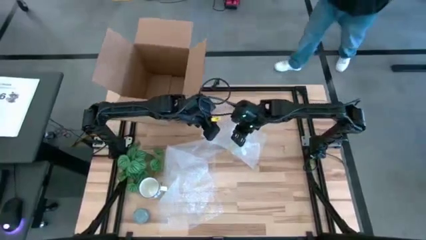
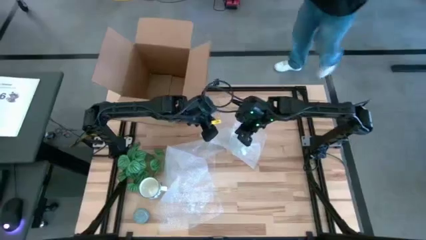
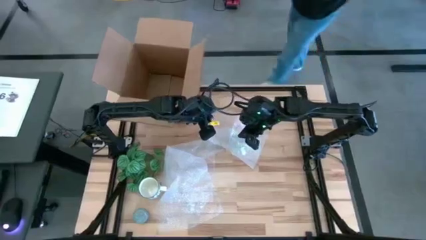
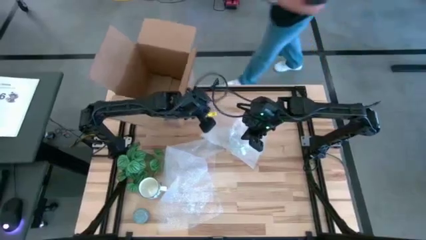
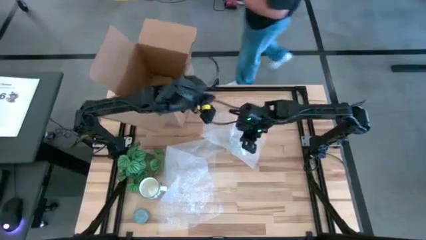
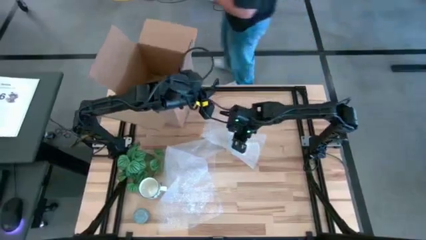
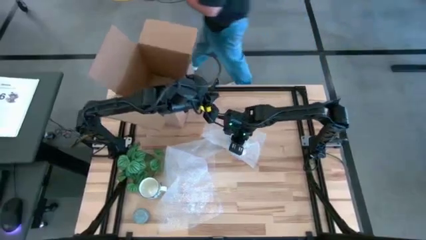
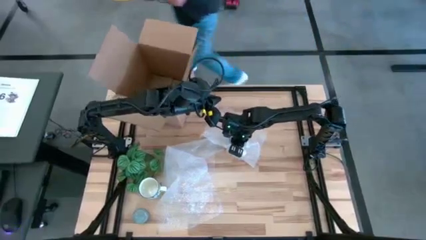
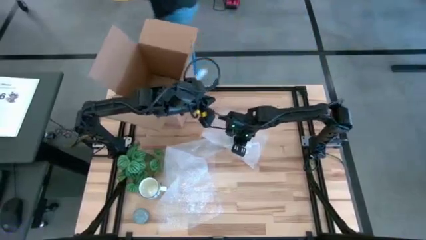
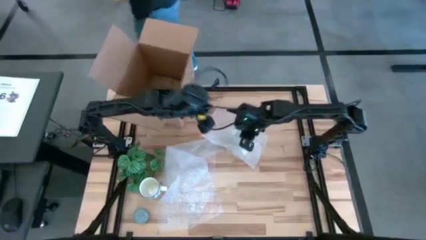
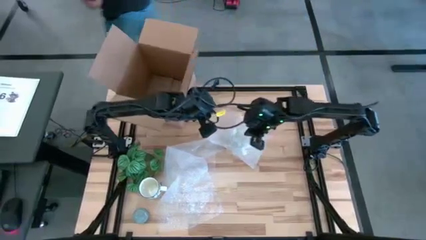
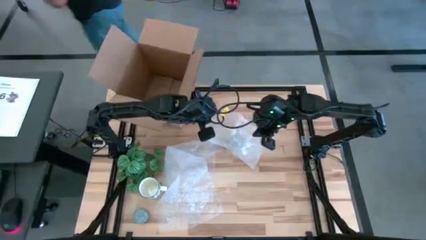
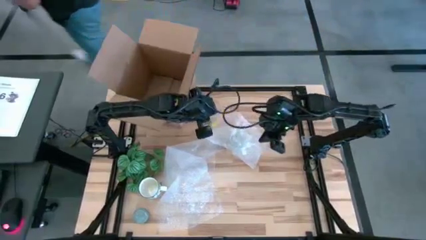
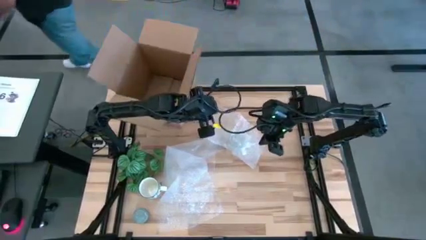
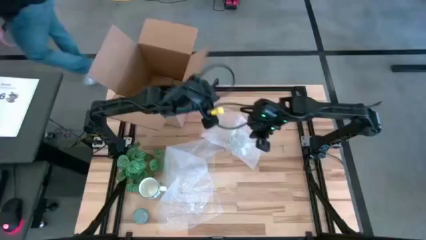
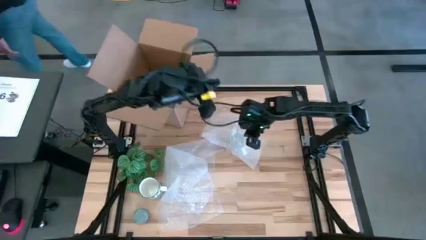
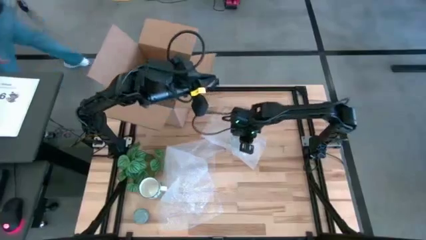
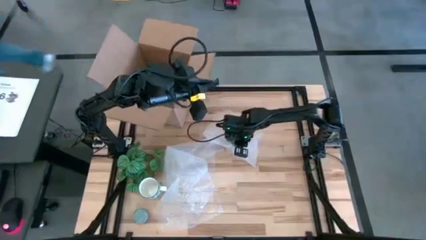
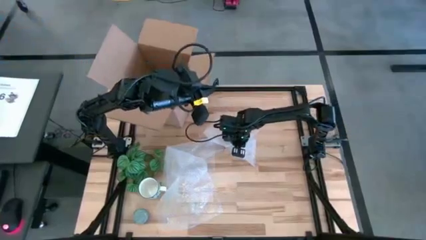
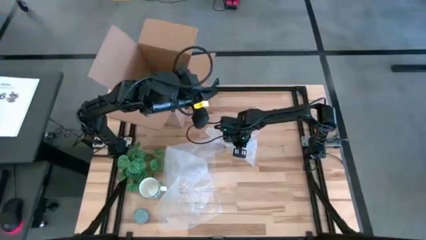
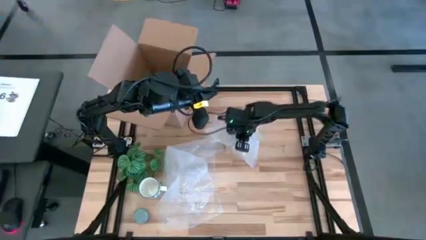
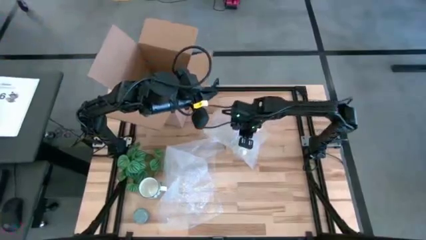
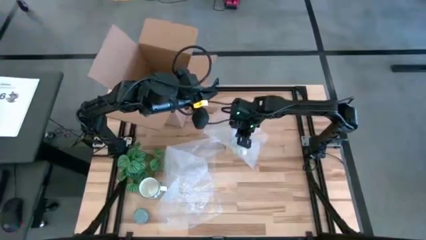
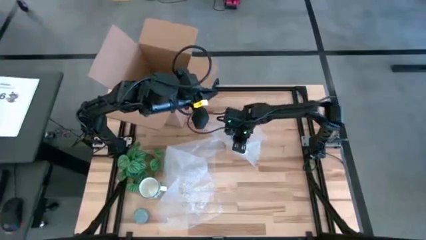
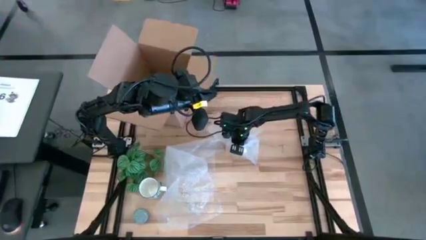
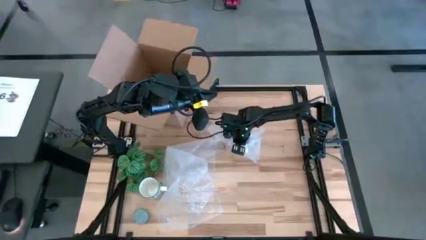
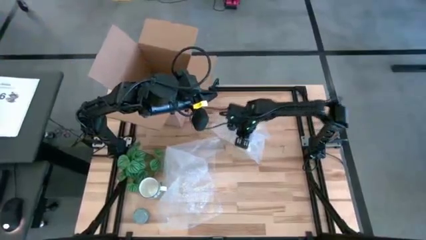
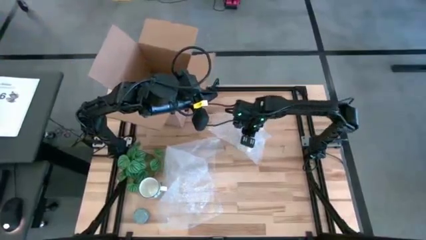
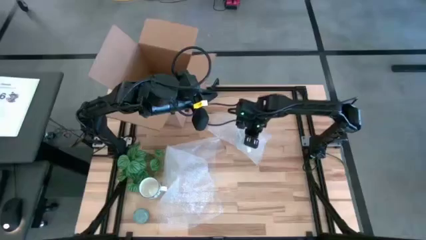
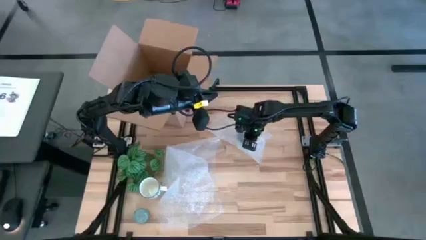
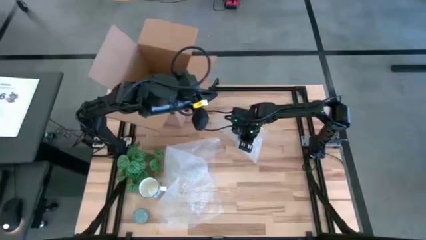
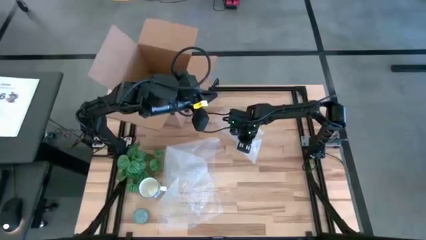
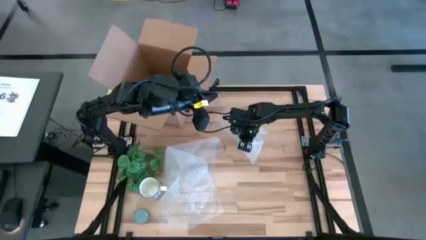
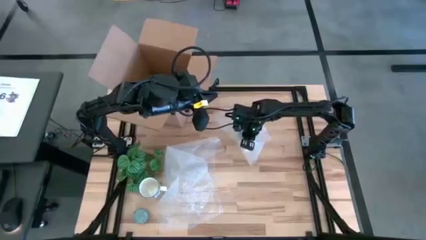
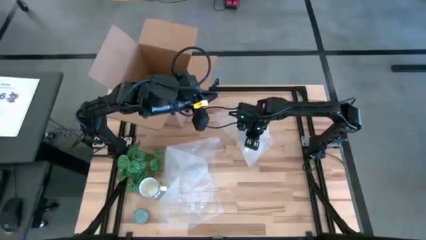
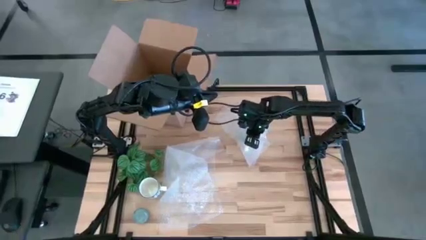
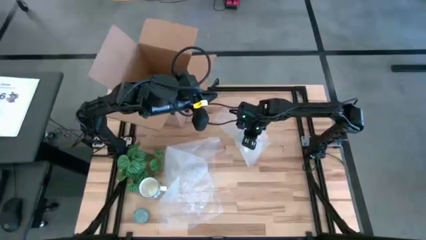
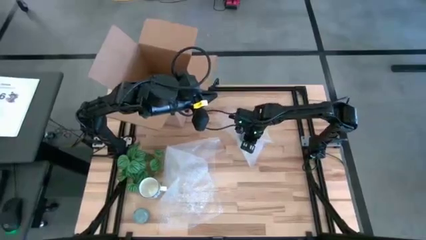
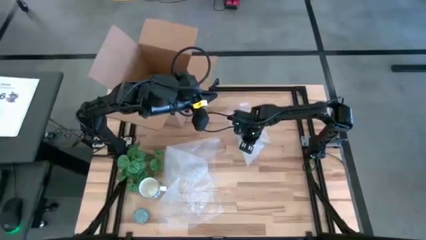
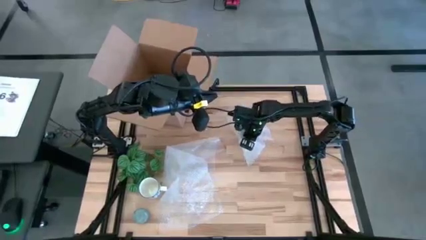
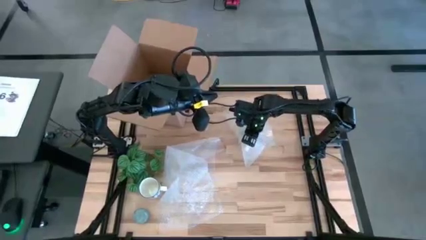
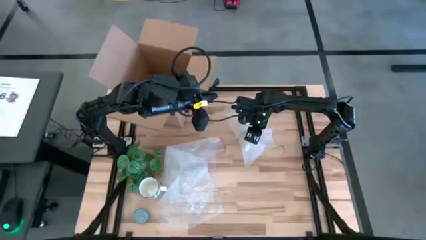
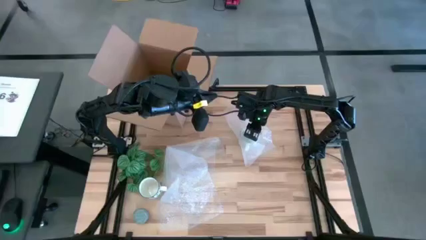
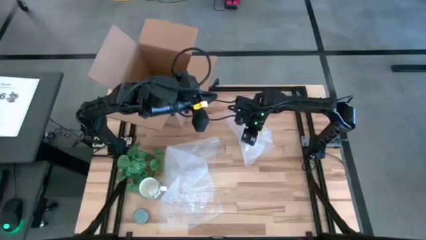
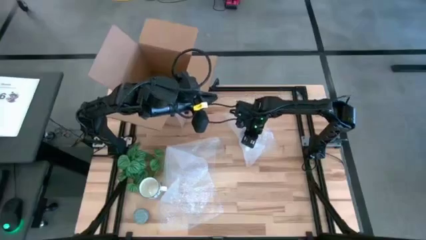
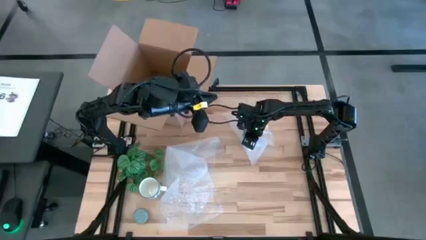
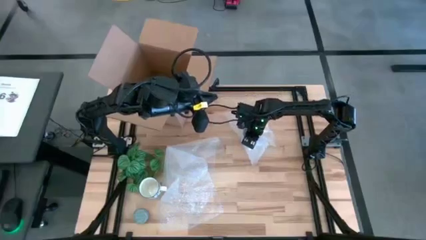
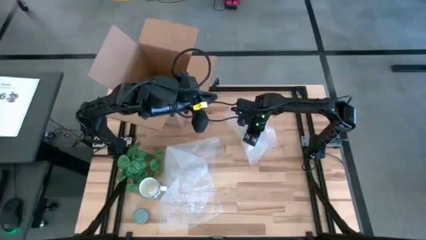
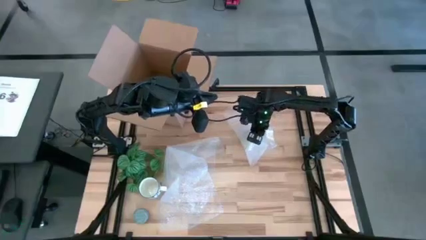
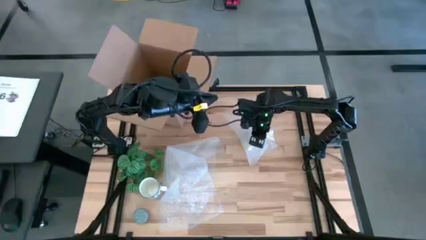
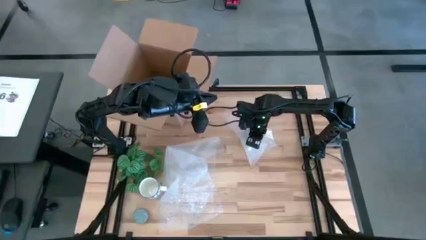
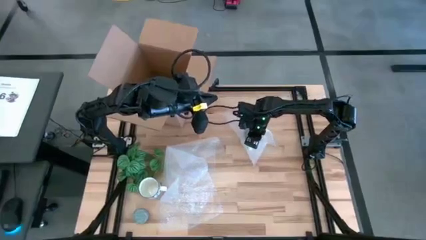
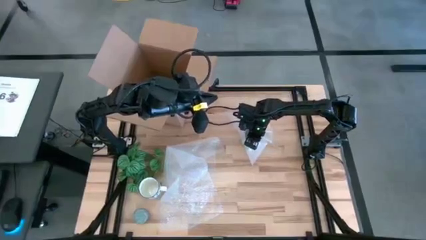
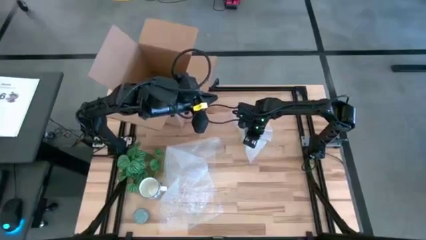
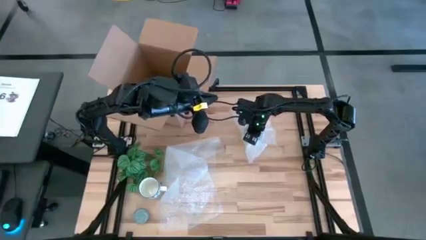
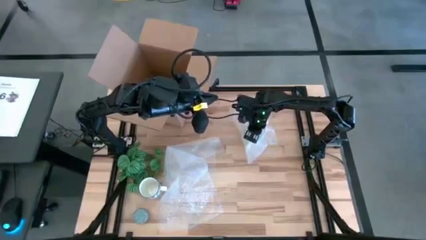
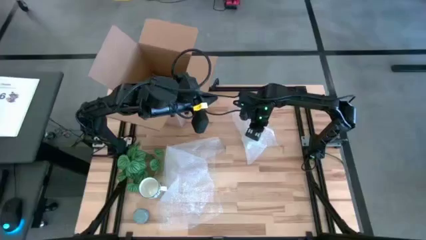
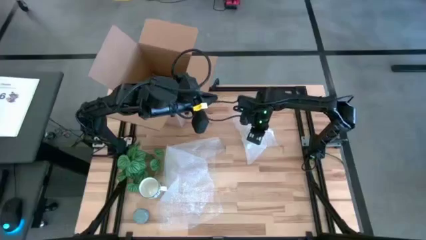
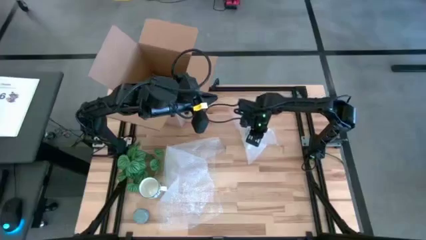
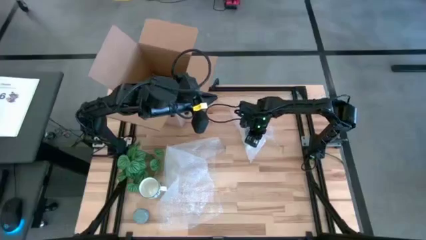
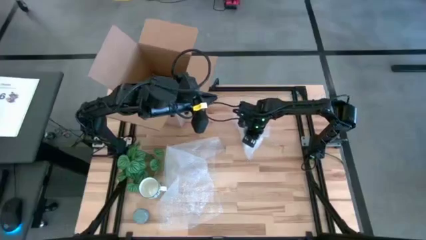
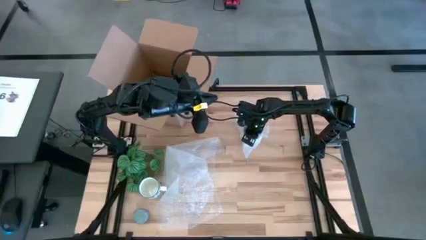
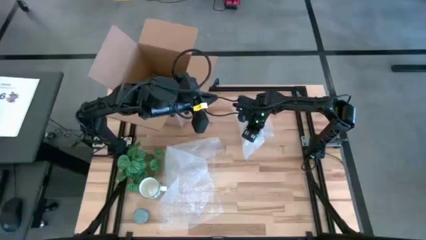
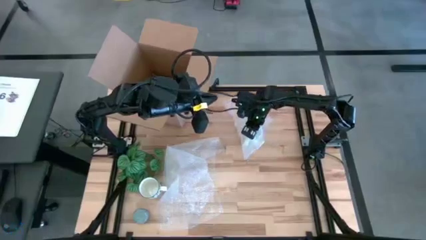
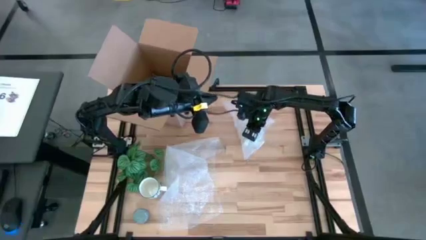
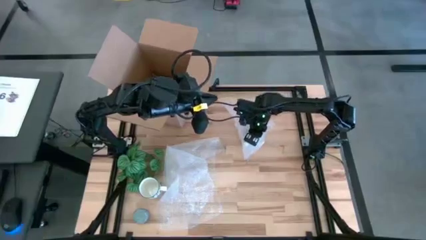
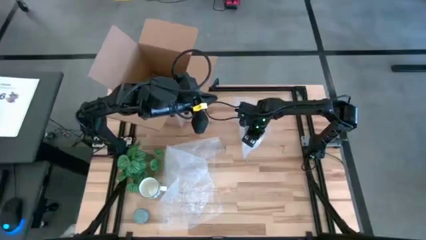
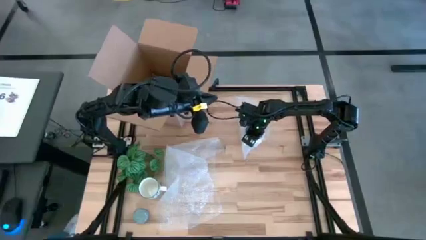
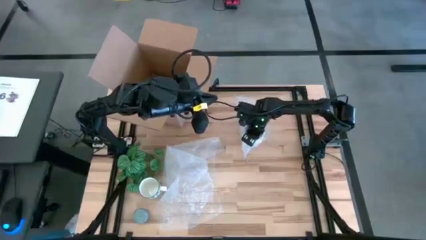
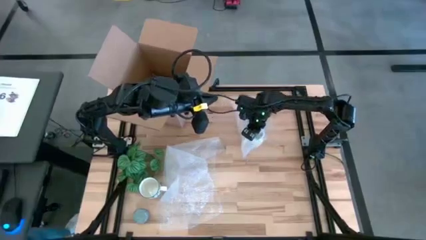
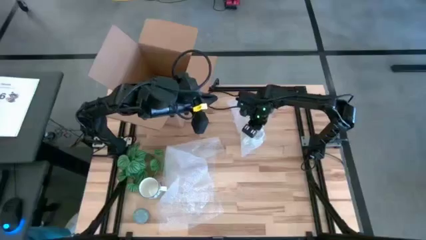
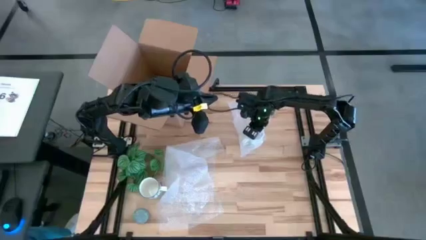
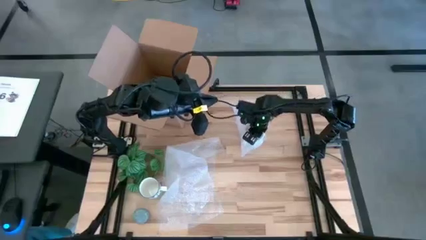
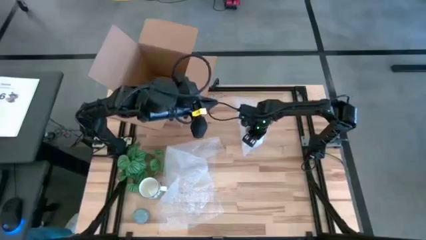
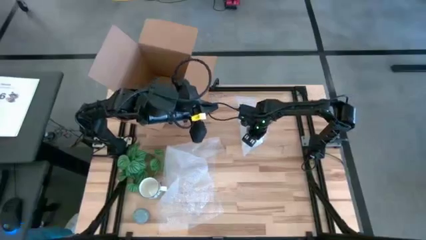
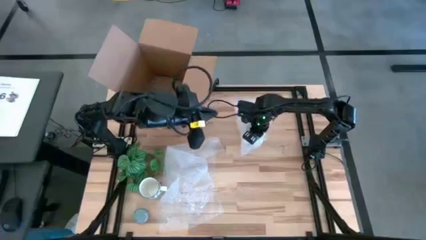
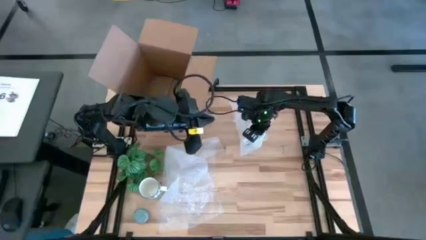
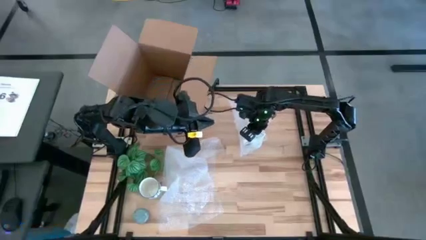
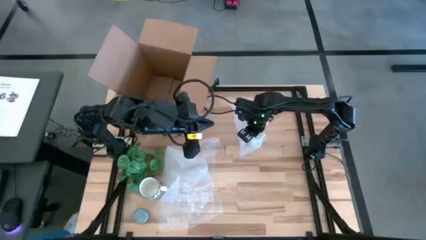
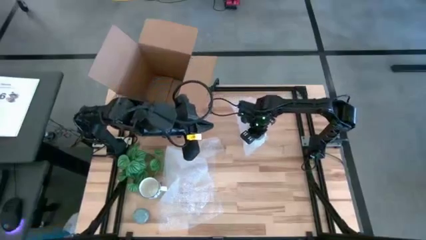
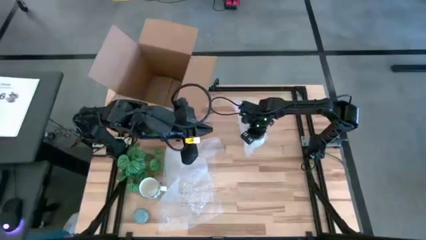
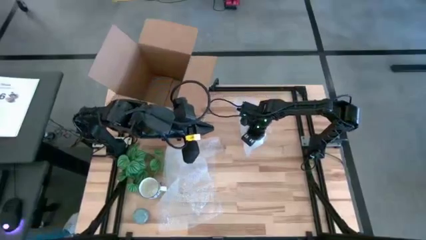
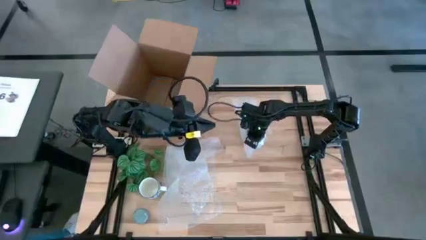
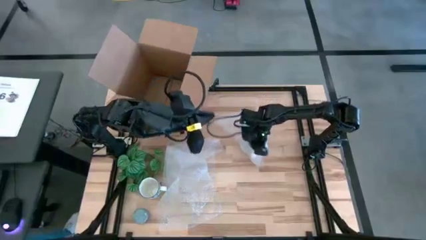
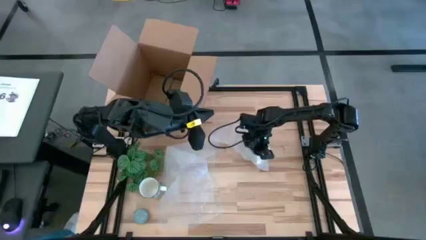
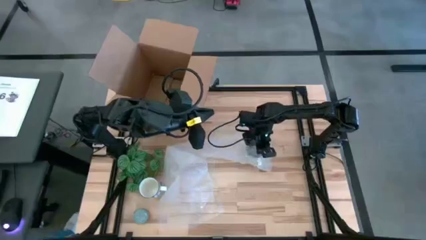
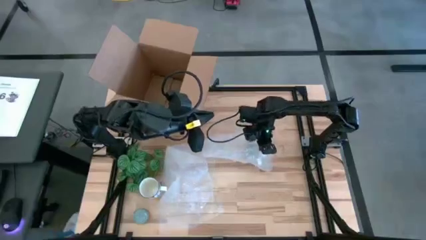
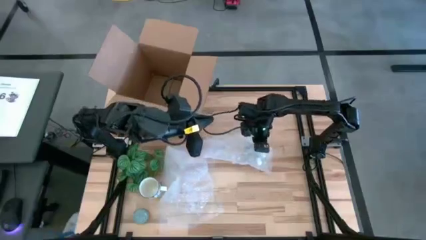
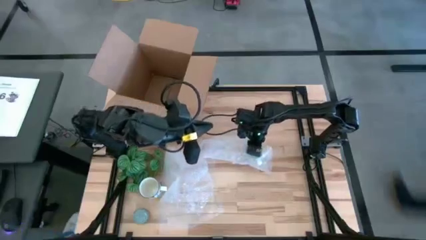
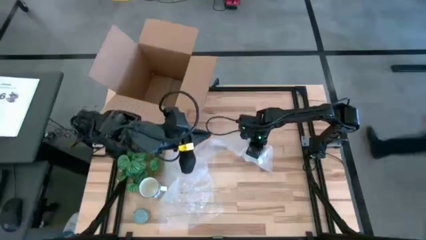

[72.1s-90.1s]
Task: wrap mug
Wrap the green mug with bubble wrap
